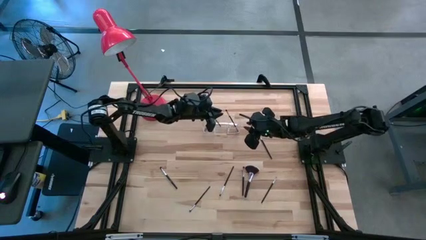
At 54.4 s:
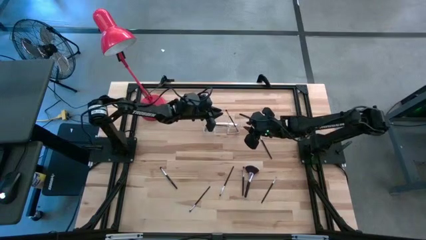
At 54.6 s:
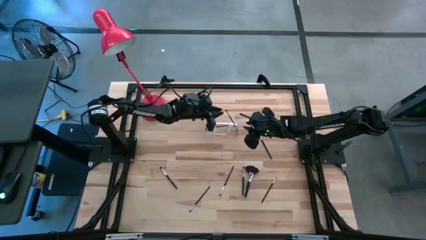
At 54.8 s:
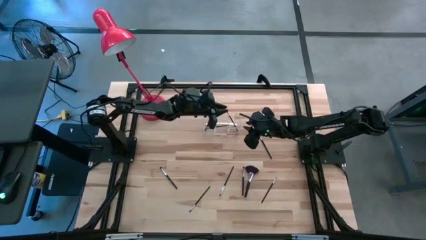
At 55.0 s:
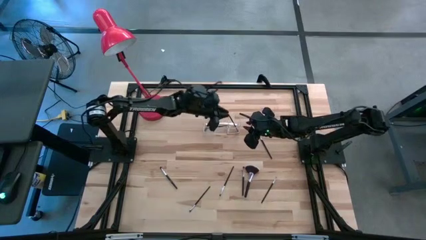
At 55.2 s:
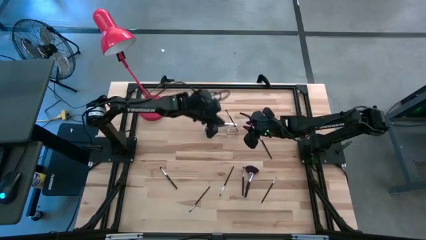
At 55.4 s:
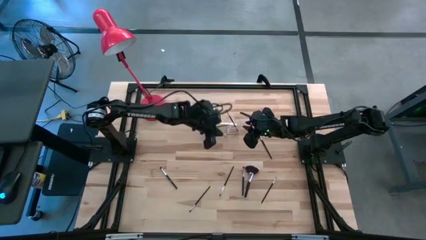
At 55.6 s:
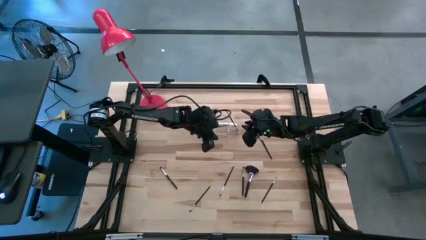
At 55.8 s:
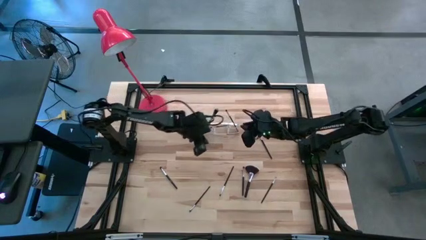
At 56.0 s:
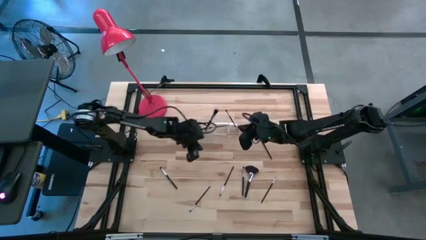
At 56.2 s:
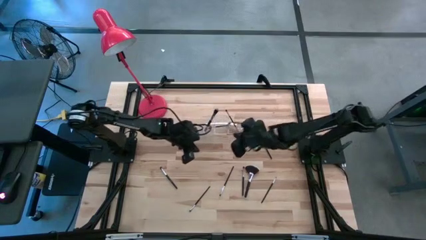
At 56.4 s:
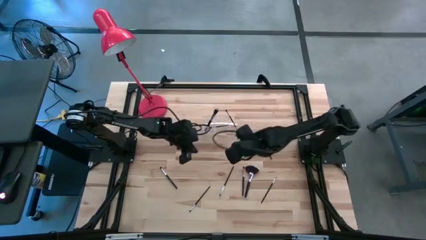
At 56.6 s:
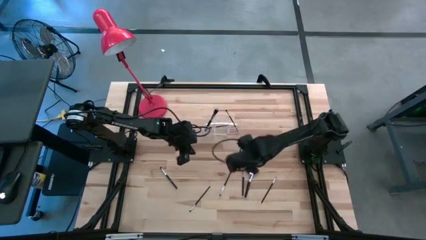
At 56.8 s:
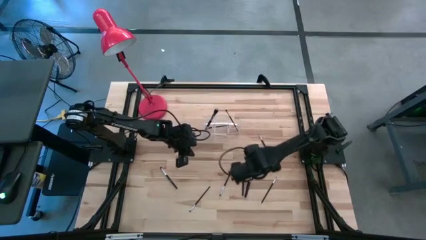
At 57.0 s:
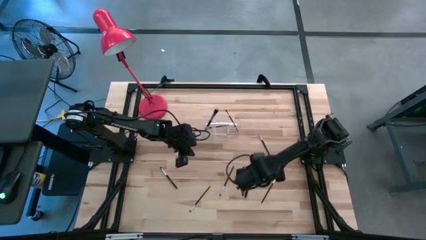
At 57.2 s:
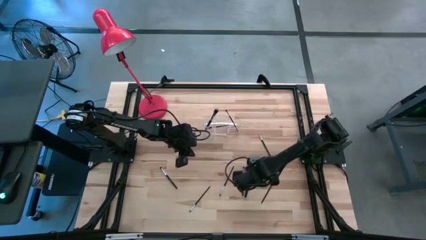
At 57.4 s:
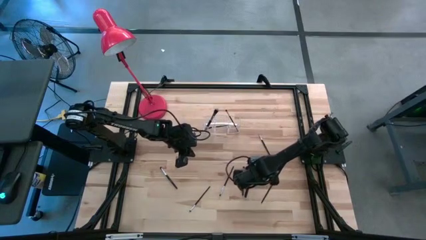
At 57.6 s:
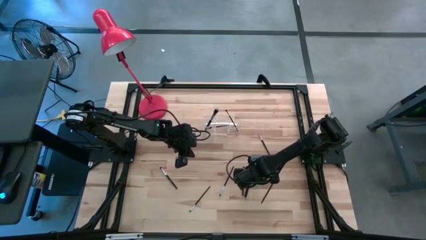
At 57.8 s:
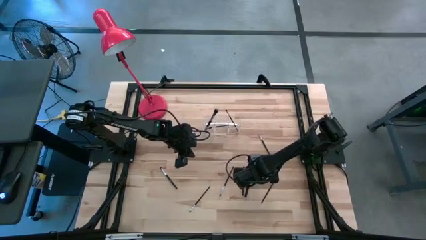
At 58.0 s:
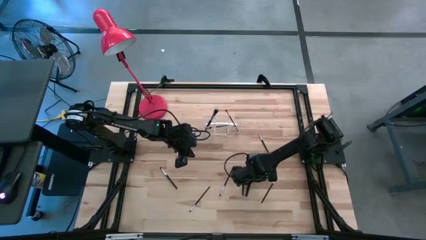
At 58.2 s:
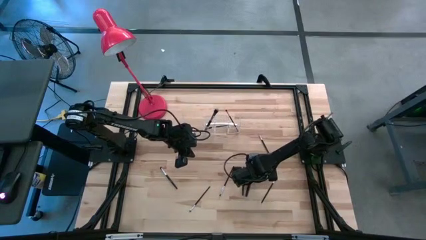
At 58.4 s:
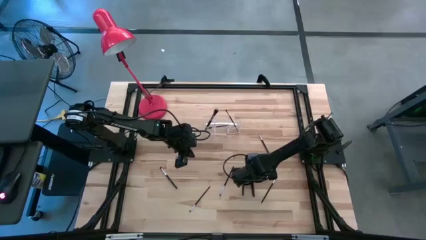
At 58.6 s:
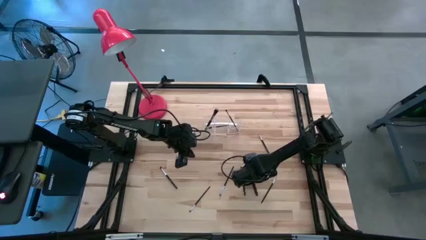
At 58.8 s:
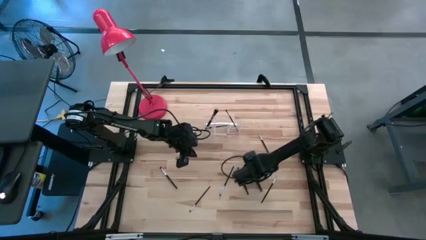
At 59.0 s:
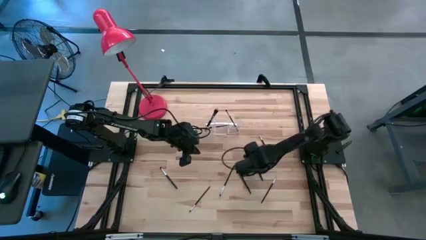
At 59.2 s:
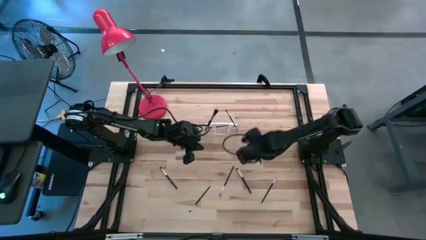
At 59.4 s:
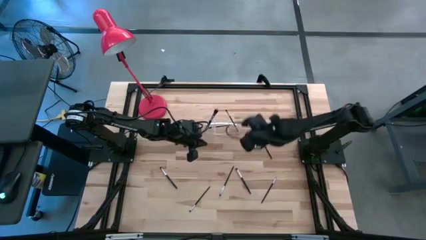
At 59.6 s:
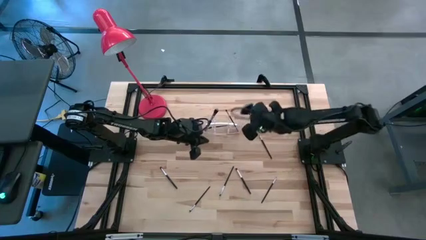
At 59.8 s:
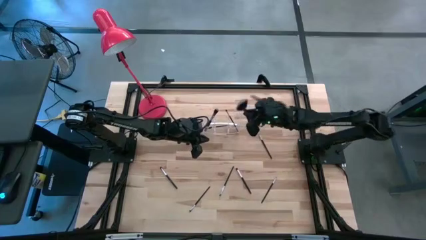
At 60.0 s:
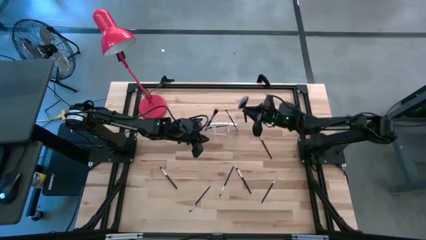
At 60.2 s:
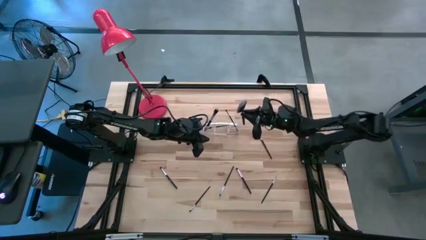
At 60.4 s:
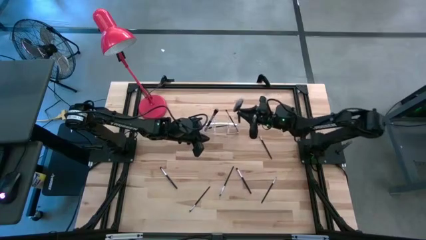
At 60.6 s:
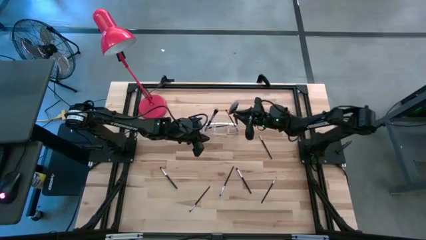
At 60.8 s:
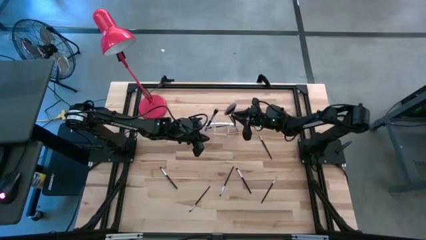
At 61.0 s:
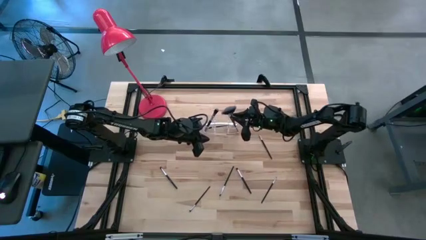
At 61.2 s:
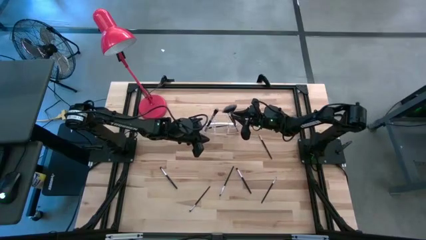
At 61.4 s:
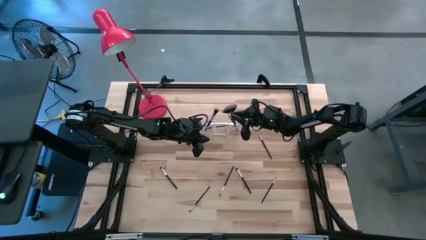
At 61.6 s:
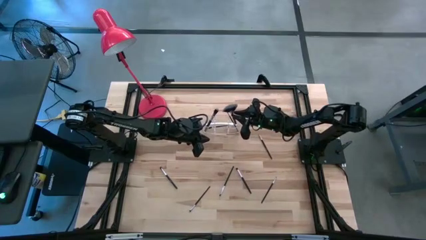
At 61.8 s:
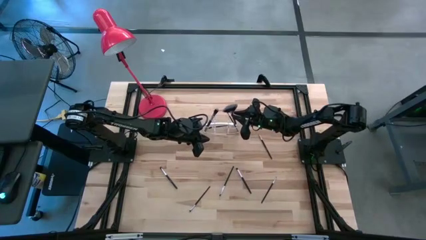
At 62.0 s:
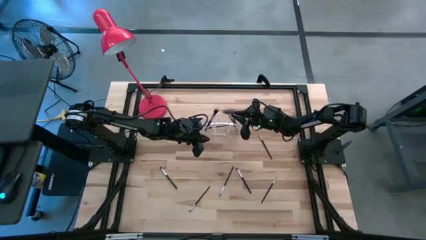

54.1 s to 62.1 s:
Task: Pick & Place Makeup Supplies
Put the makeup brush into the transparent organizer

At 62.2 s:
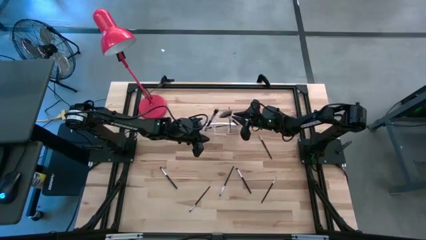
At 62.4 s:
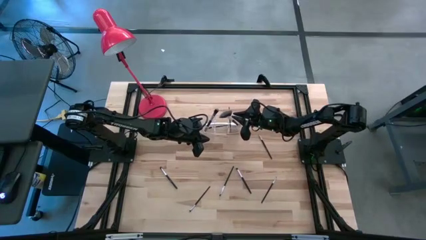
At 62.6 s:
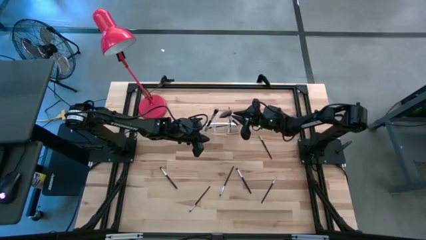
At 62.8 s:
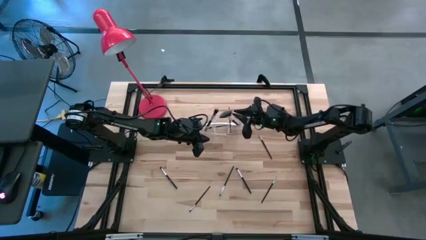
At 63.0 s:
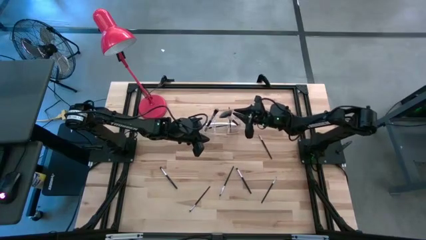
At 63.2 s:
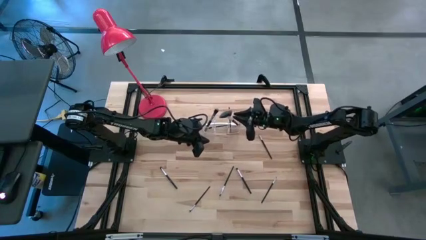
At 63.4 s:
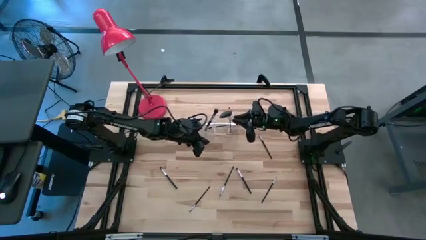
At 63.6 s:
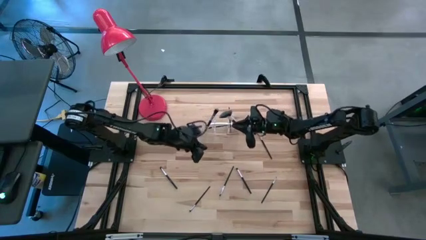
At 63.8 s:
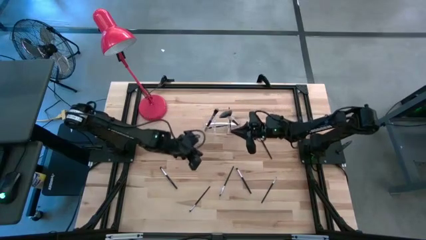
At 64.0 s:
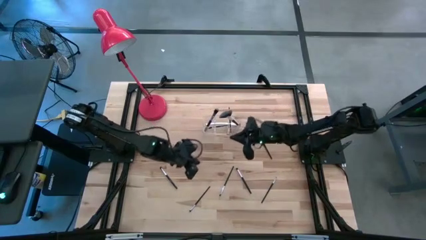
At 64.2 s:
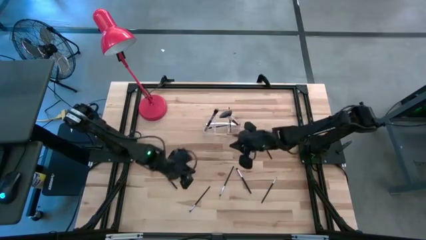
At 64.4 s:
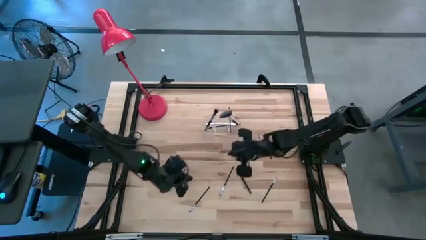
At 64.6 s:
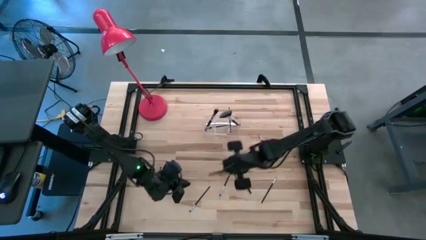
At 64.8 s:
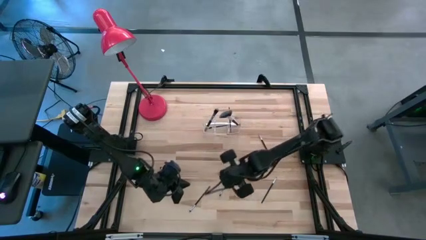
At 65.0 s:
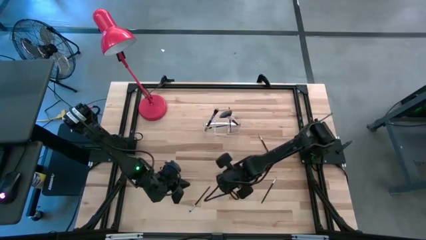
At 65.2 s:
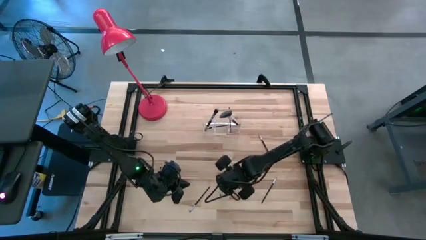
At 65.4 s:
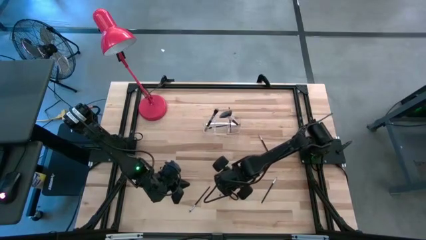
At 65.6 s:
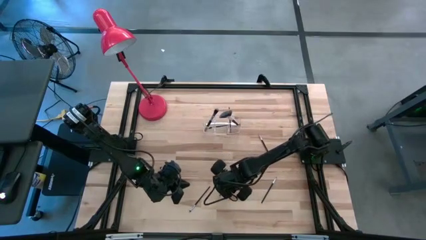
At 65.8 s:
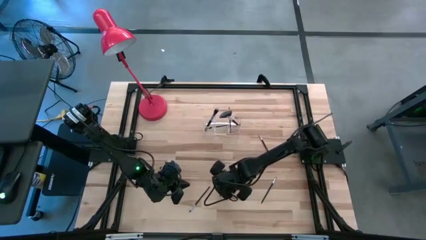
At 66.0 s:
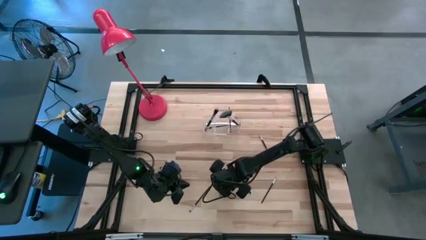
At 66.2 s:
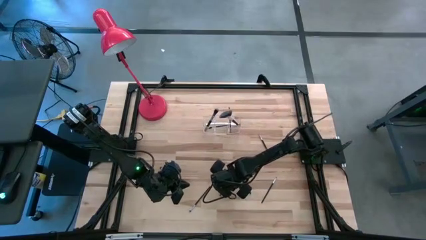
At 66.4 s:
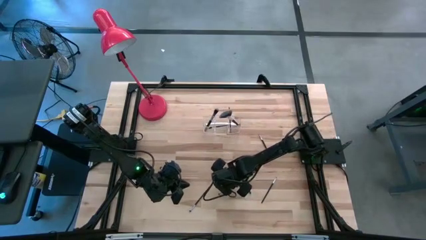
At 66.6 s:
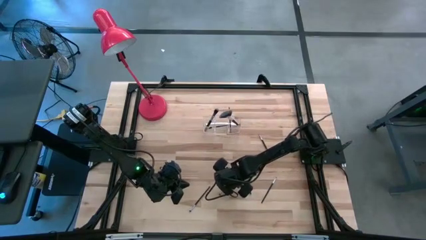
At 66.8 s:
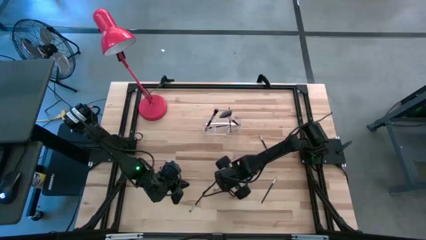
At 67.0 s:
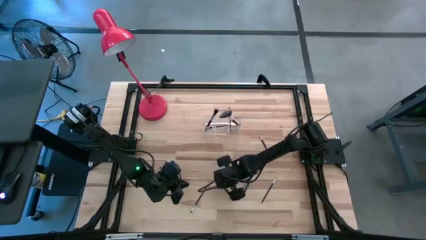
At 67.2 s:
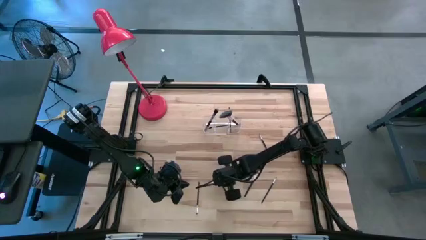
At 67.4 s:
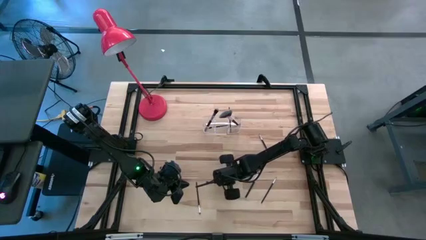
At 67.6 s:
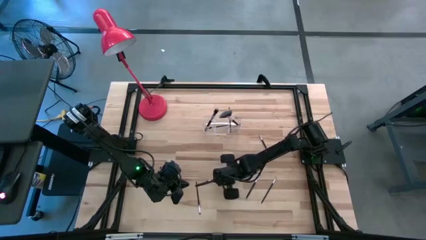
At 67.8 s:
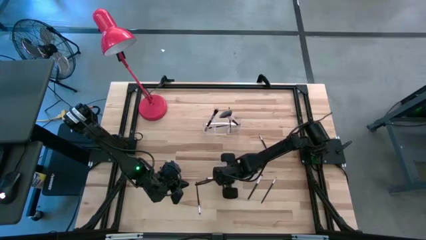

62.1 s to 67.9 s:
Put the makeup brush into the transparent organizer

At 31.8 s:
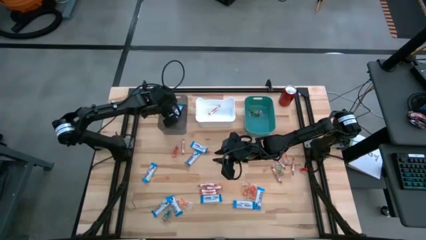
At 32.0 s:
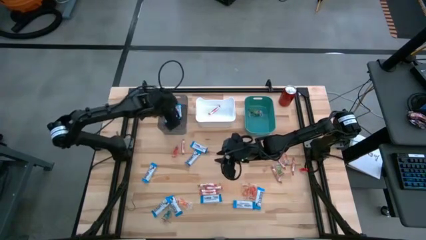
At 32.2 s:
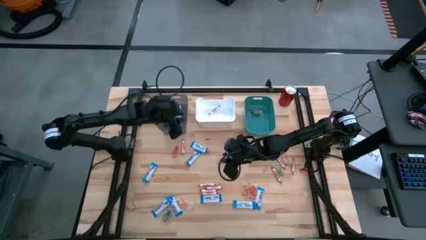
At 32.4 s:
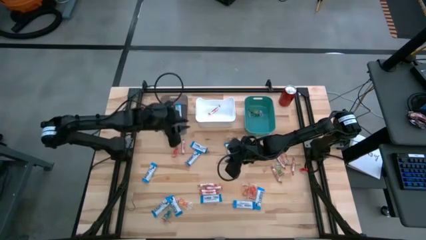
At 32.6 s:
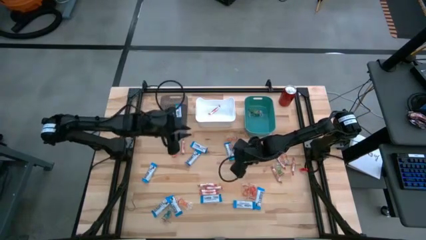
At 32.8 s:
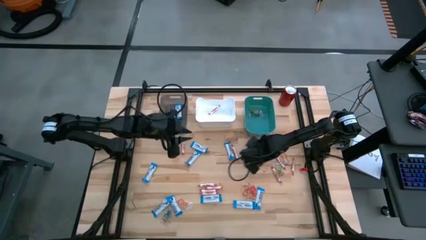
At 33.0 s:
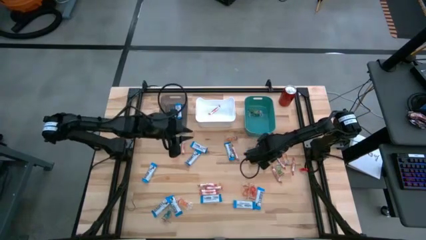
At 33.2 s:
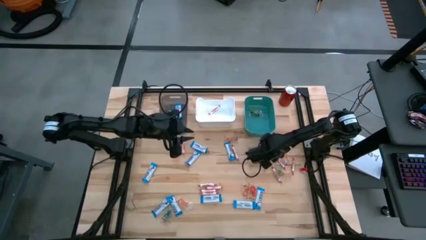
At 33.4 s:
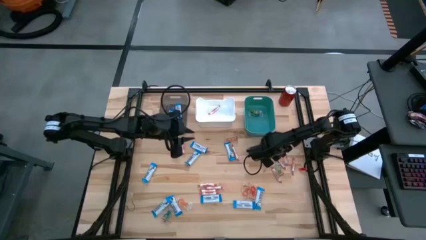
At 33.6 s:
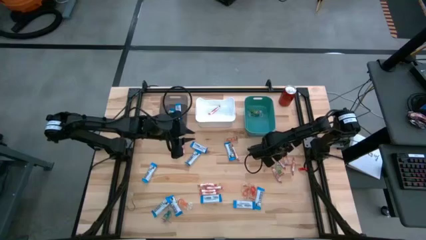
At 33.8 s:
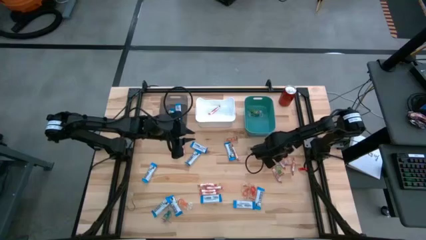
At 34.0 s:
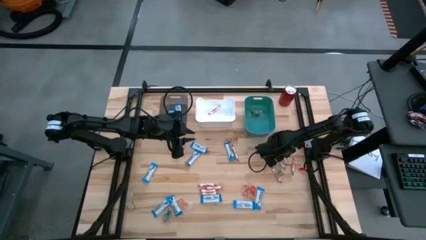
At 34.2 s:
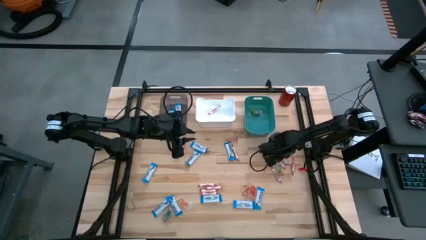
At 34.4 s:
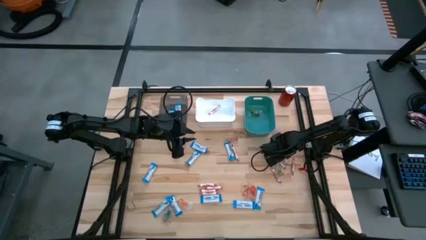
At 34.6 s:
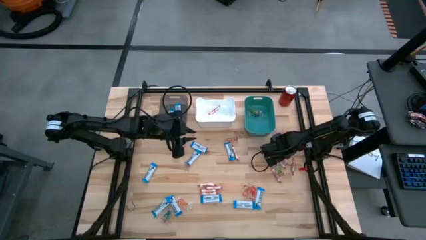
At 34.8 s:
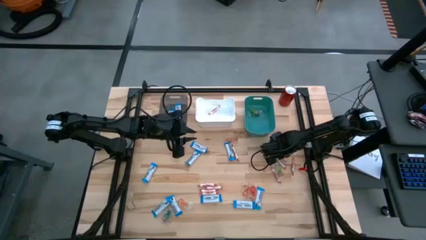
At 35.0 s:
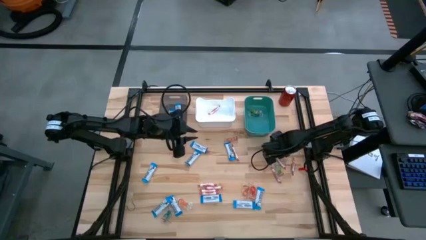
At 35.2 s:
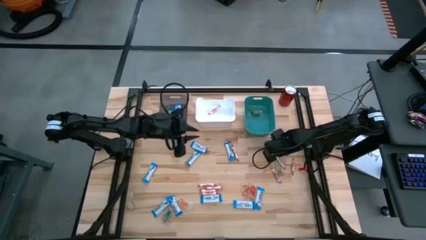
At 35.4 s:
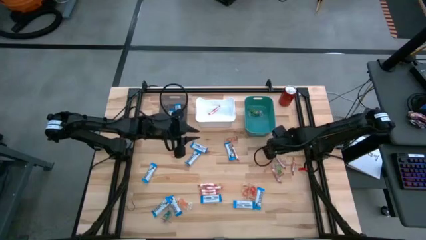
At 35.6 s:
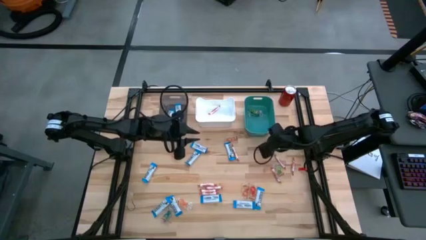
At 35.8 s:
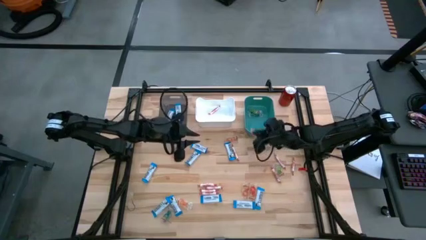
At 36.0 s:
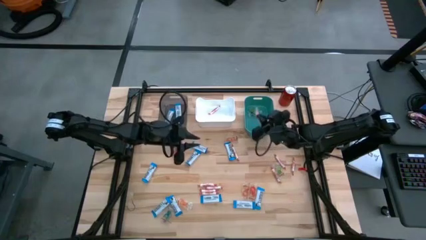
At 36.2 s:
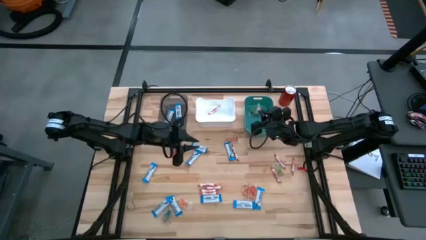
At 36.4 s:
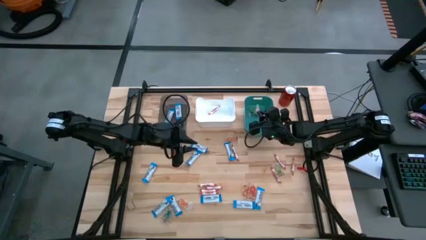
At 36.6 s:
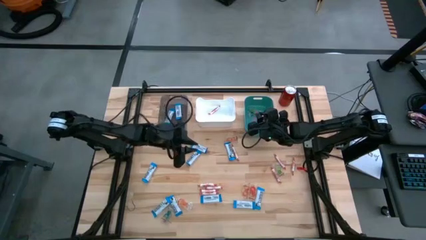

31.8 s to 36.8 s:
Task: Sort candy
Put the transparent candy into the green bin
